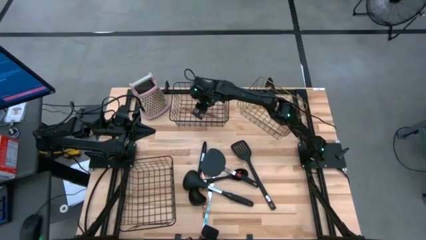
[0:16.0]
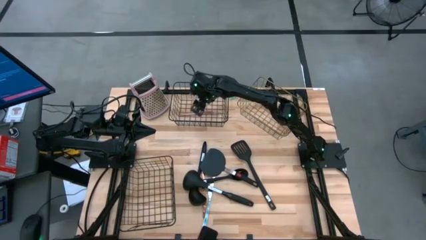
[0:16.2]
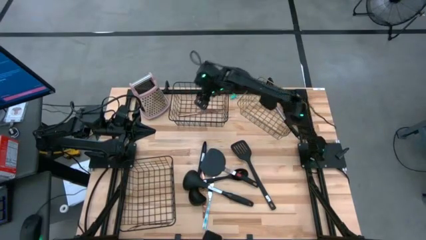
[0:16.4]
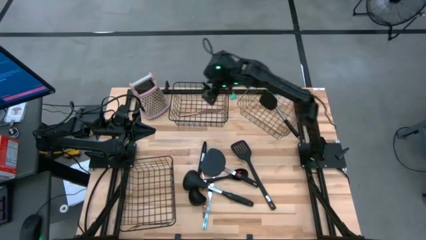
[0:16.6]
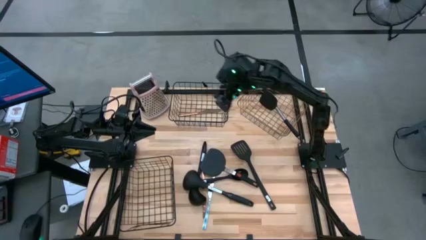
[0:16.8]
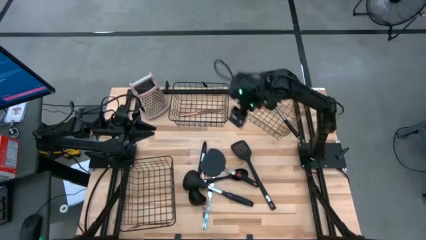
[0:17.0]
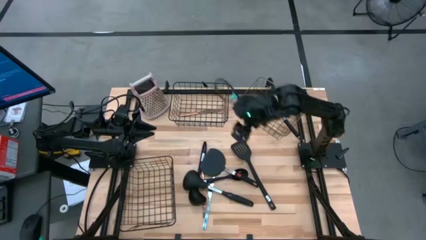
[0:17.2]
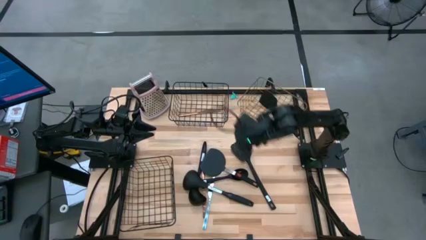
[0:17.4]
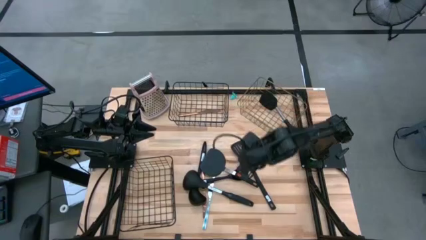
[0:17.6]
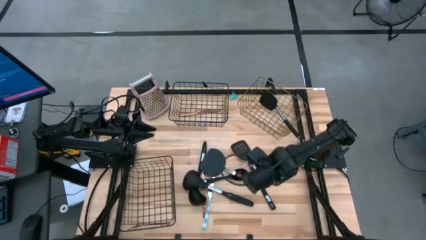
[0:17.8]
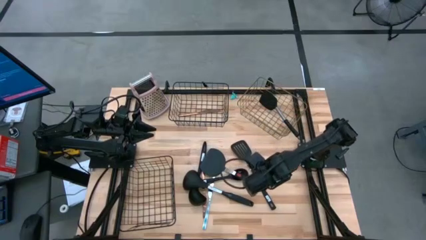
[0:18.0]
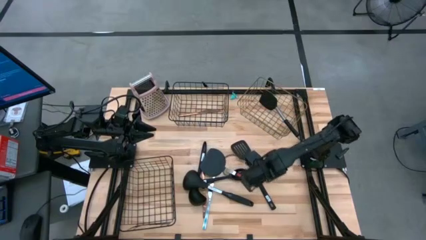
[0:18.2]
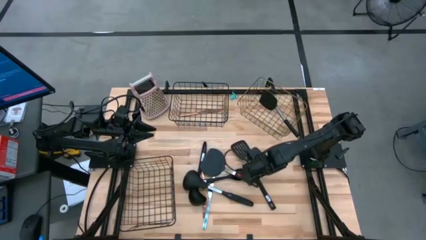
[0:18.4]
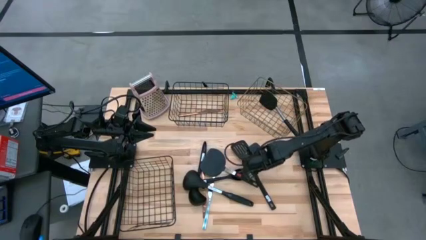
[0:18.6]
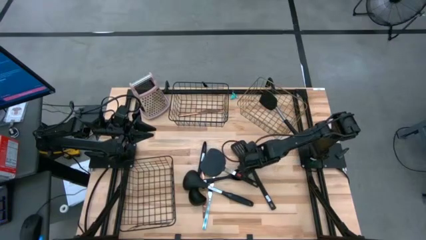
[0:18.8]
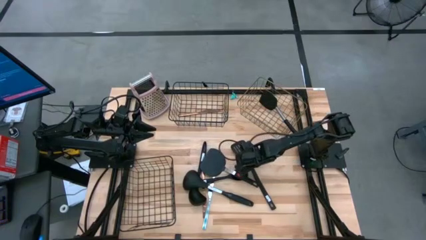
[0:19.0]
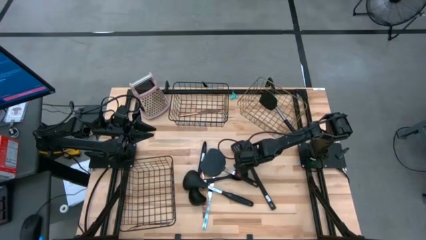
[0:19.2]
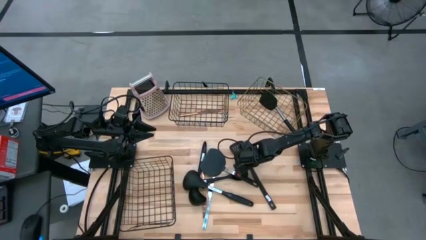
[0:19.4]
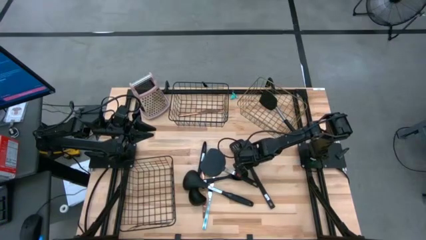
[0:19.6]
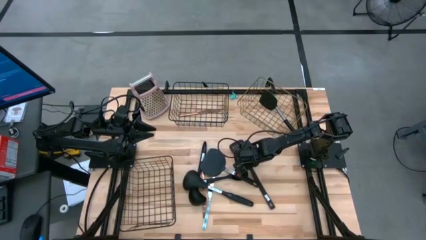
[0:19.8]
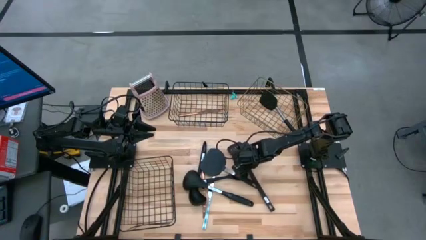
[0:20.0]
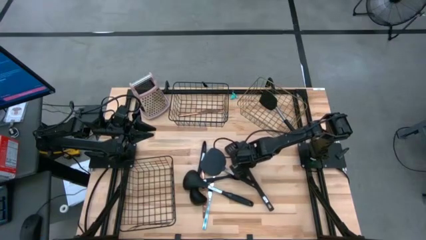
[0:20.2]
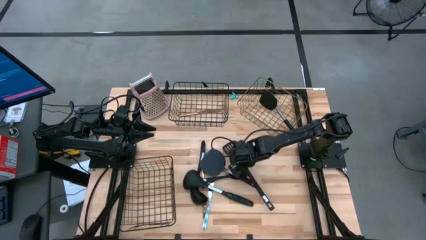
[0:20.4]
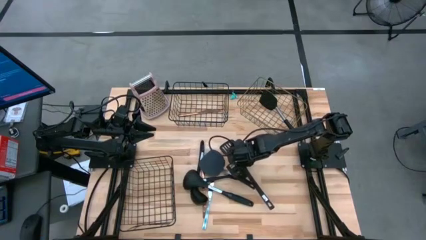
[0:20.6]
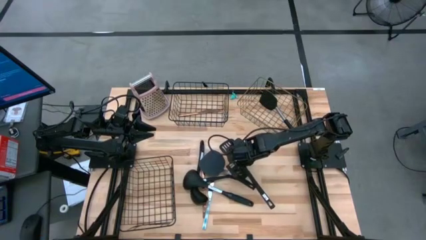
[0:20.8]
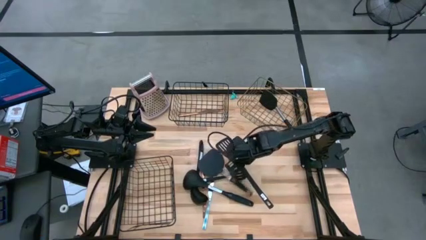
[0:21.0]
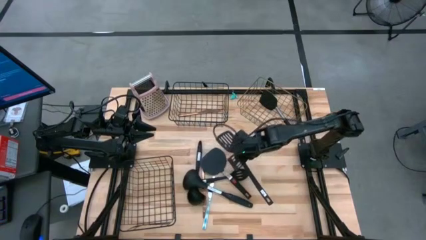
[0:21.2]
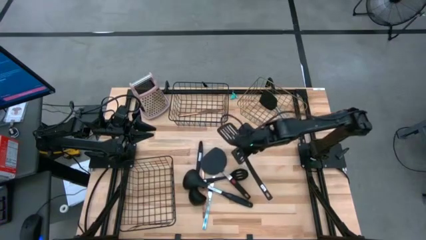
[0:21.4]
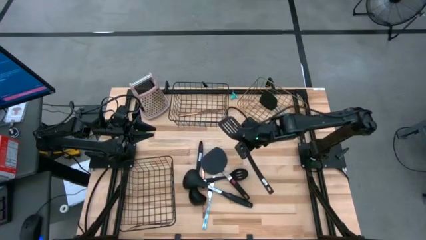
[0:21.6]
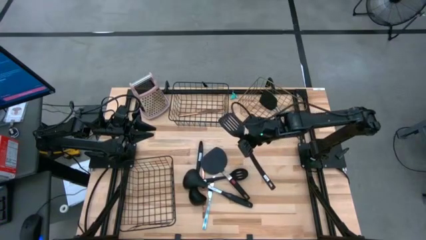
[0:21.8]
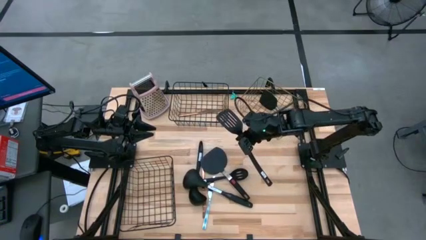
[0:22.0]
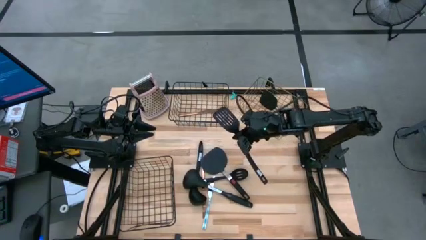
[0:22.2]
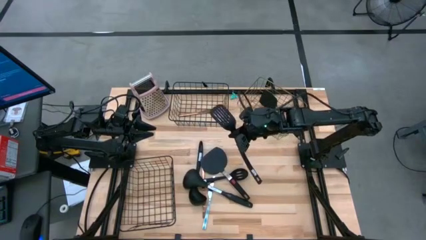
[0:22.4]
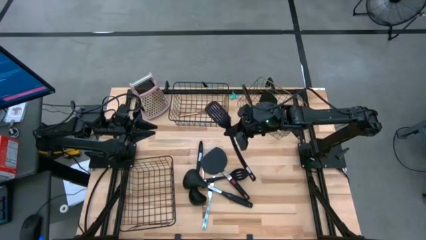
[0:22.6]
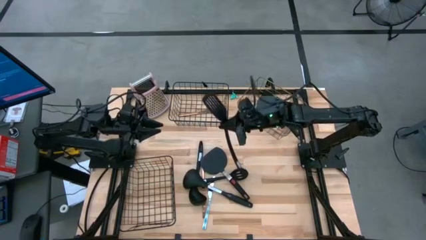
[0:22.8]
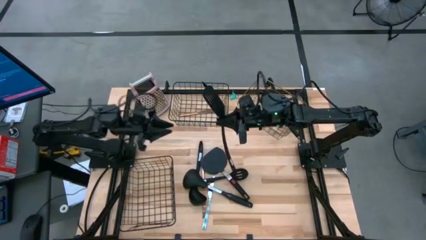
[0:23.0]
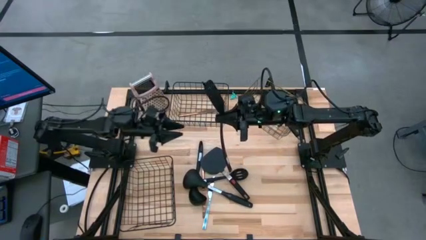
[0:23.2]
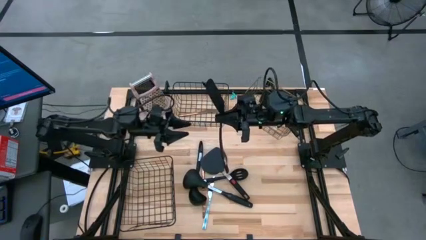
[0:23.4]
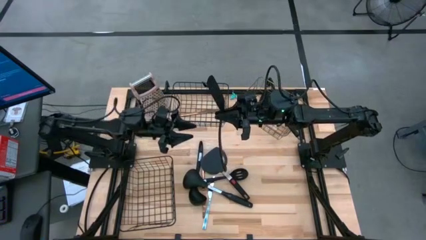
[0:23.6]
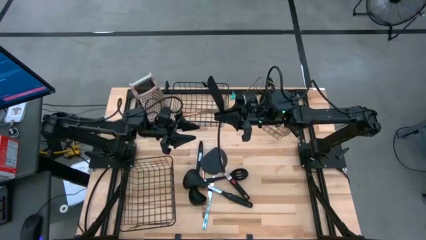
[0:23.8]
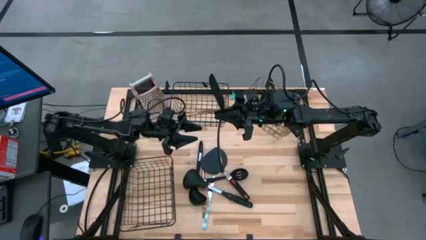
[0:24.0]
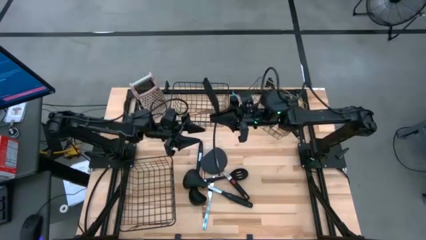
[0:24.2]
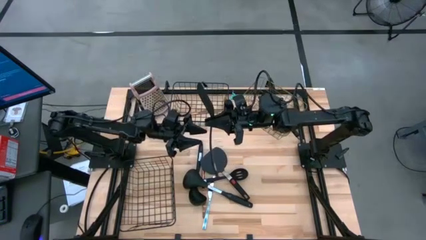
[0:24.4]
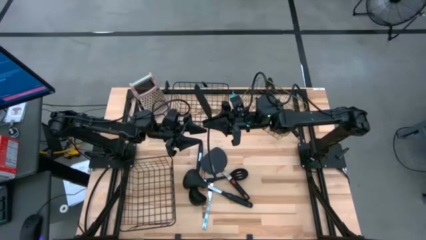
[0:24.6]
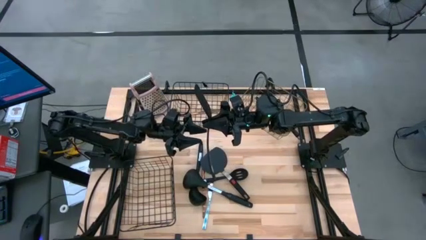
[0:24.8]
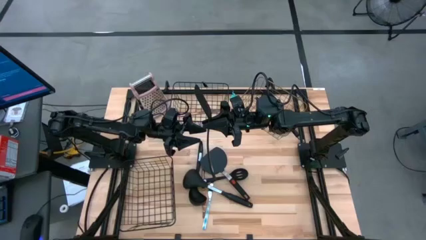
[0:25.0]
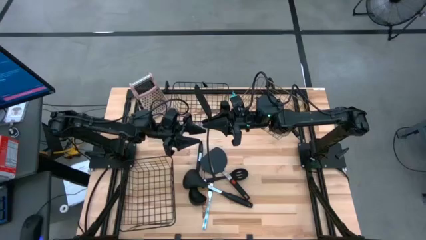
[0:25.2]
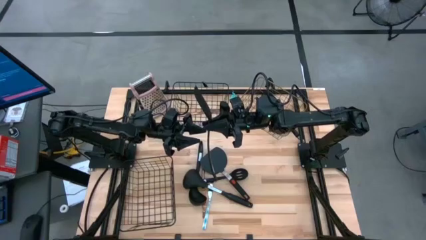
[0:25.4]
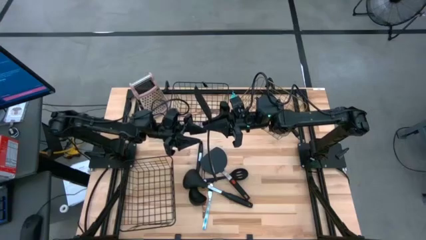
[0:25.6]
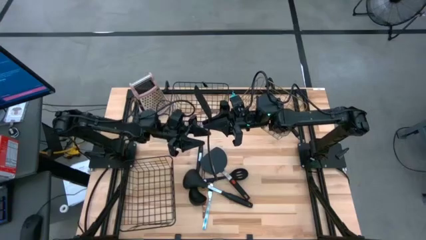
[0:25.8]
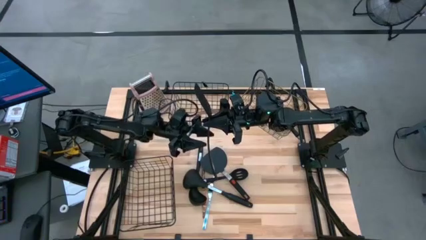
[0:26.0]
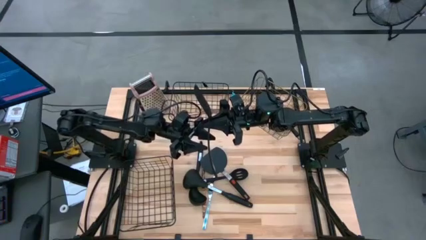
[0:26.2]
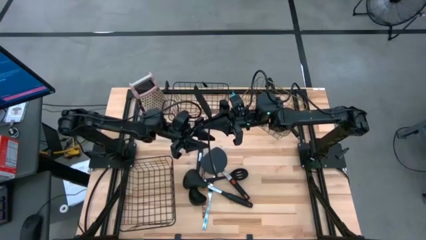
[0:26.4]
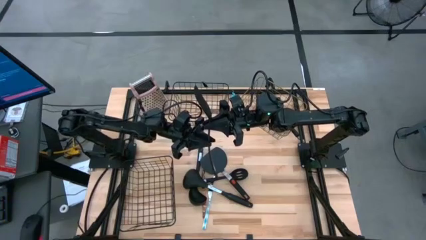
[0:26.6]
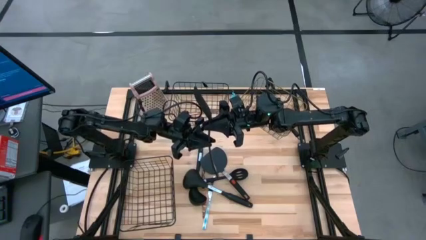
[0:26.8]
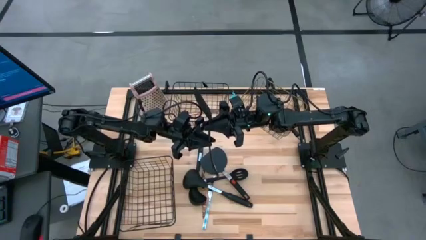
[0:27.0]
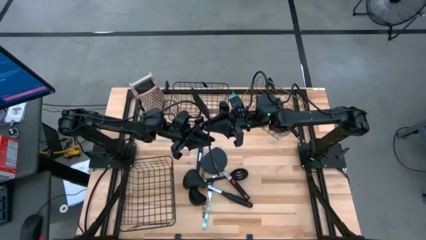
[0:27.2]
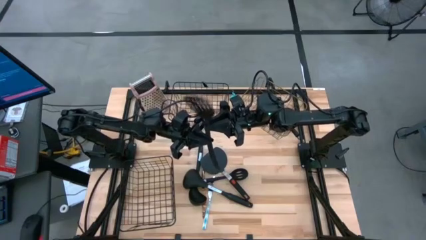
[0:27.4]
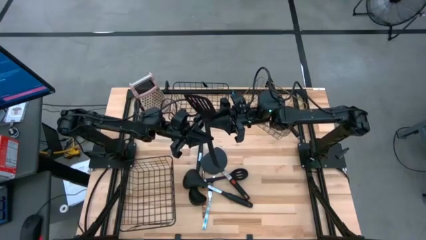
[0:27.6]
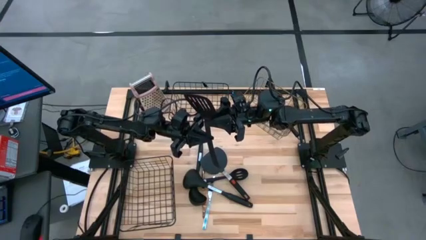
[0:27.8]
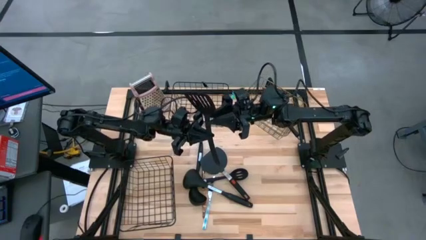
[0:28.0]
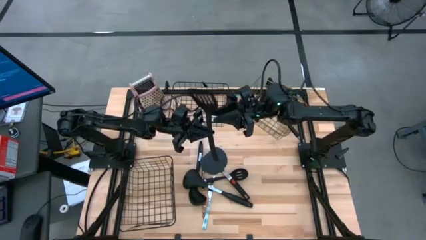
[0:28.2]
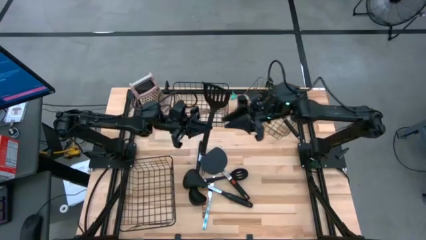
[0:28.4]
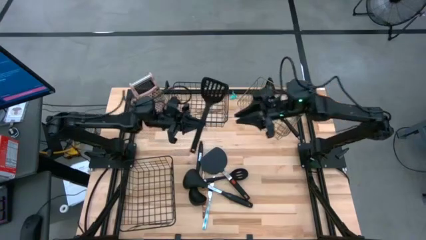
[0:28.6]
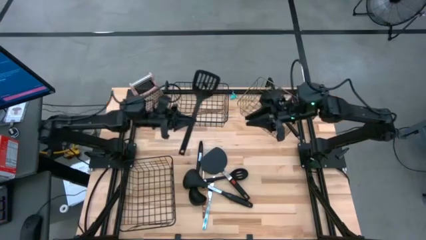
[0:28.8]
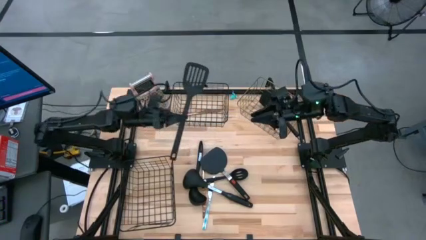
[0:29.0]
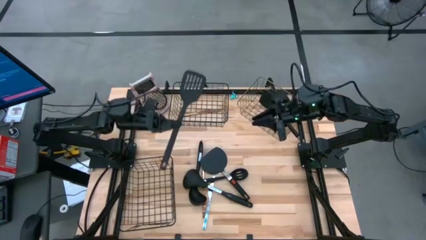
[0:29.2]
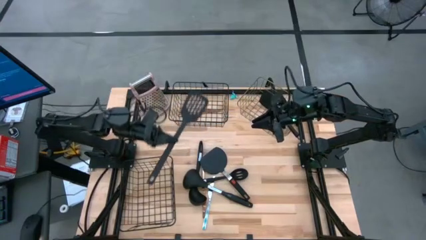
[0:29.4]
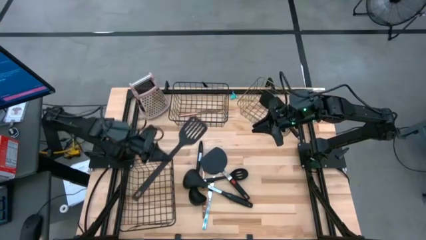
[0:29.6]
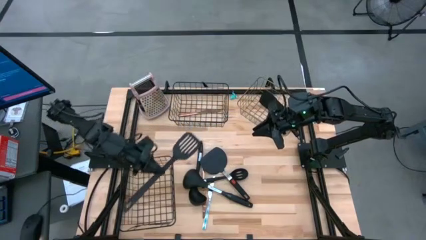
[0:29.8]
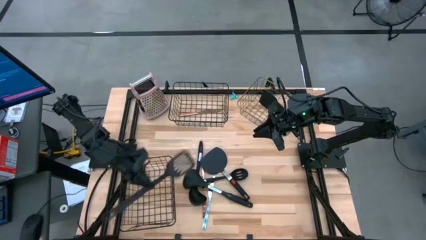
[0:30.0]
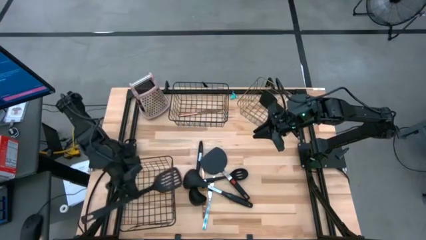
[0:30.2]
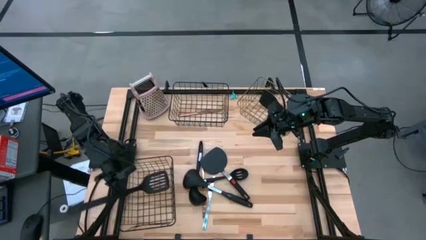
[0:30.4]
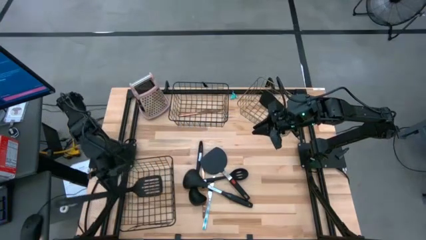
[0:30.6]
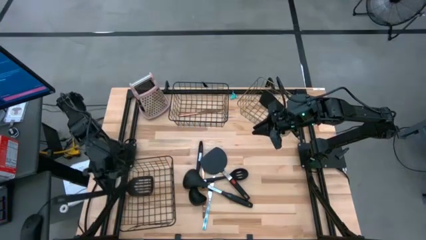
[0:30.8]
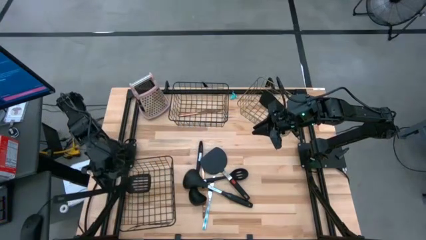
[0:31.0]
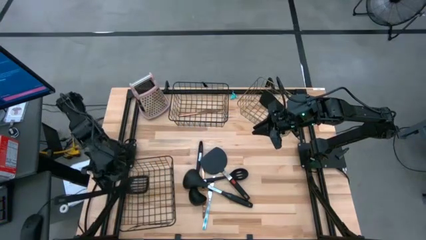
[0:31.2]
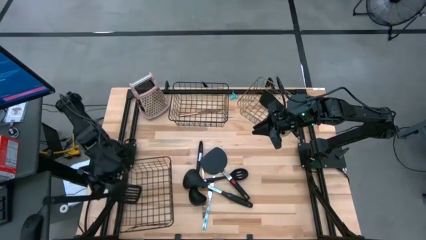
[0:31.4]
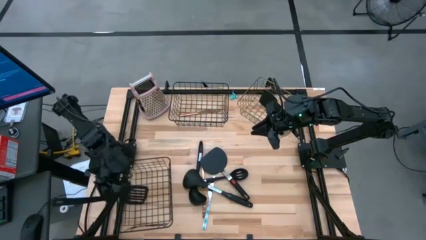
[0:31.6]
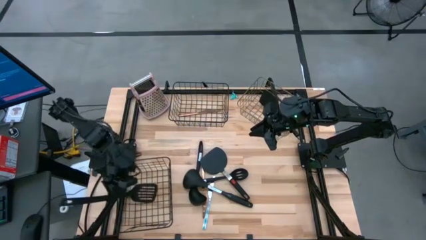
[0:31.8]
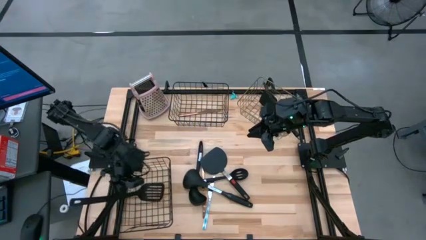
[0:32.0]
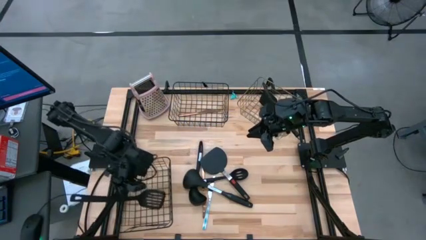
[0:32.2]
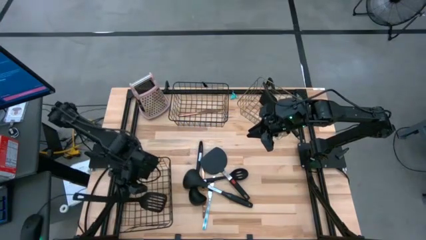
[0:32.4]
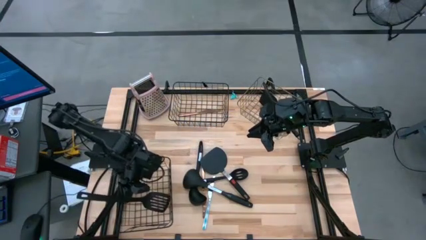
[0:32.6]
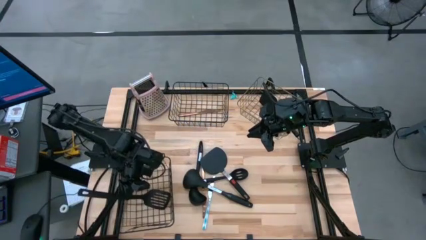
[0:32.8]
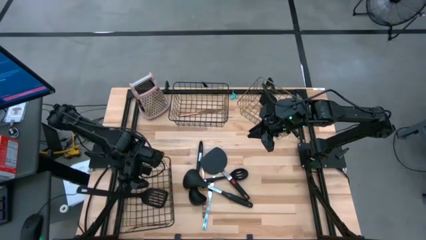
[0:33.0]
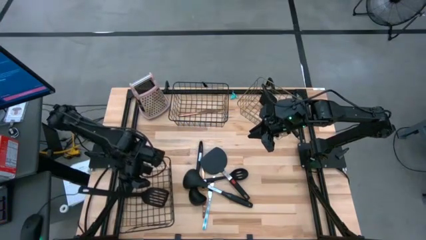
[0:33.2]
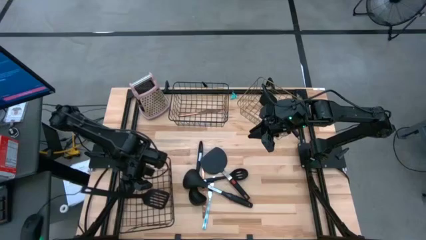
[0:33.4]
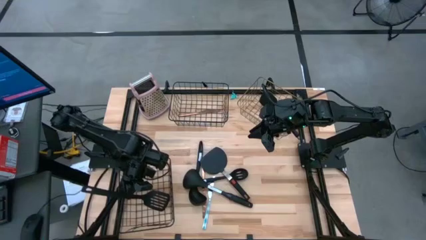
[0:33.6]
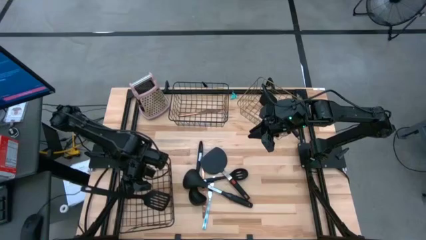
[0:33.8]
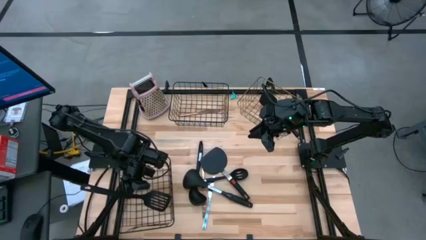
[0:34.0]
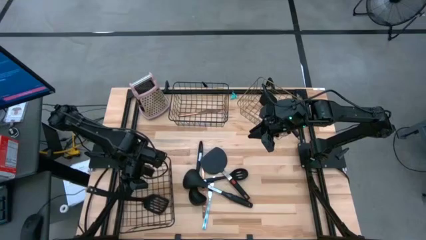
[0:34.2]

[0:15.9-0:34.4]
Task: Pick & Place Kitchen Items
Put the black spatula into the bottom black wire basket
